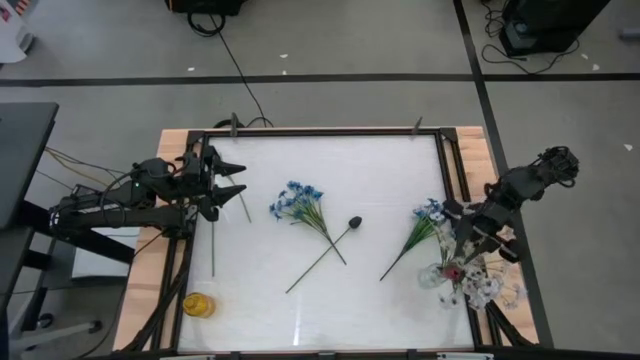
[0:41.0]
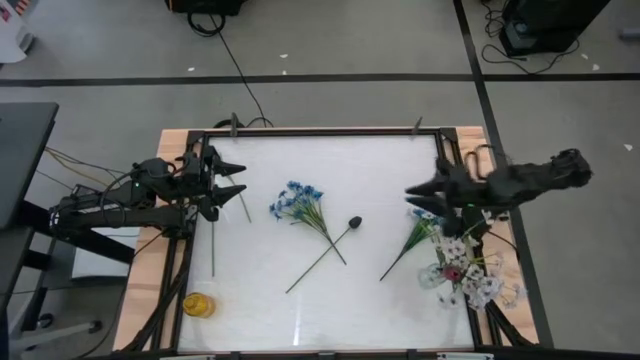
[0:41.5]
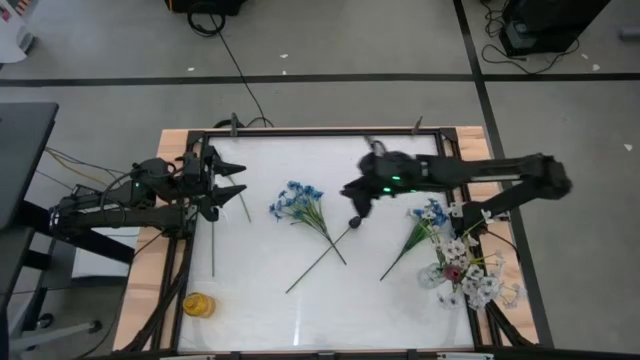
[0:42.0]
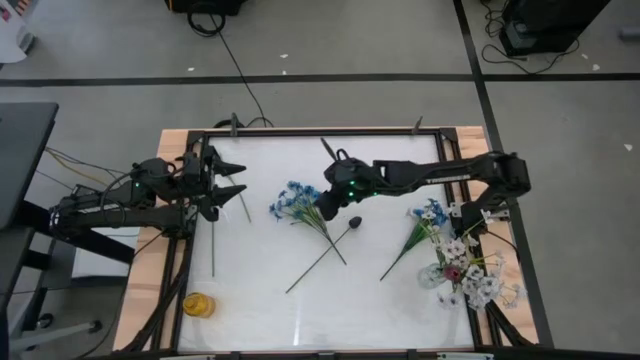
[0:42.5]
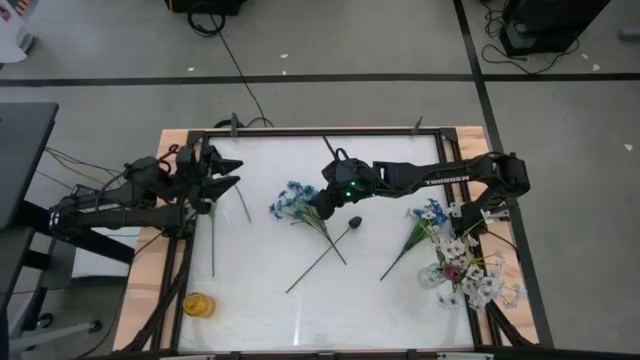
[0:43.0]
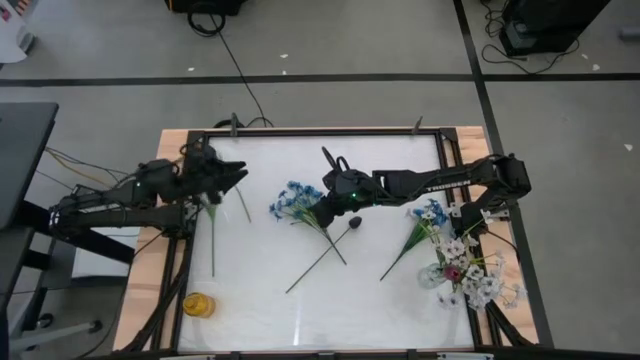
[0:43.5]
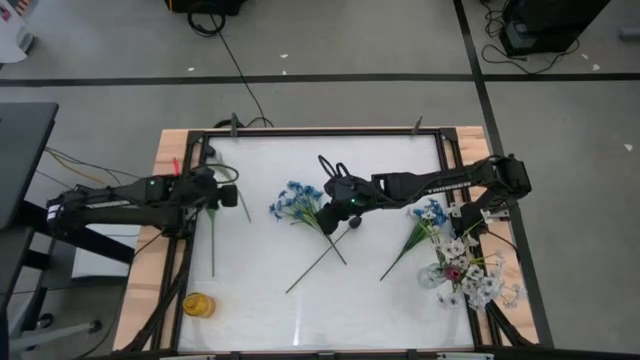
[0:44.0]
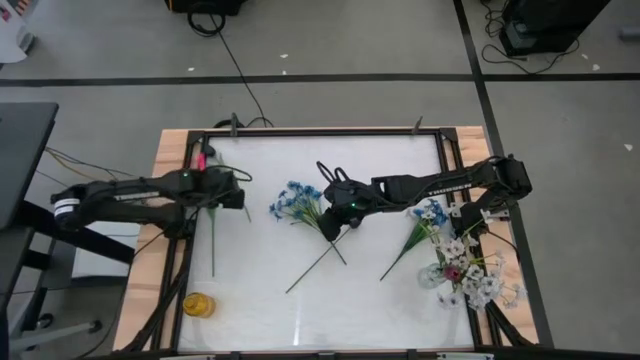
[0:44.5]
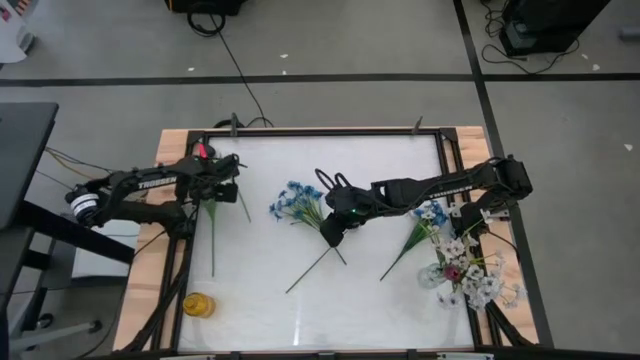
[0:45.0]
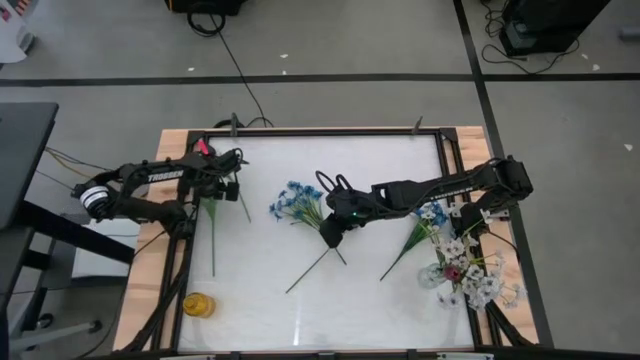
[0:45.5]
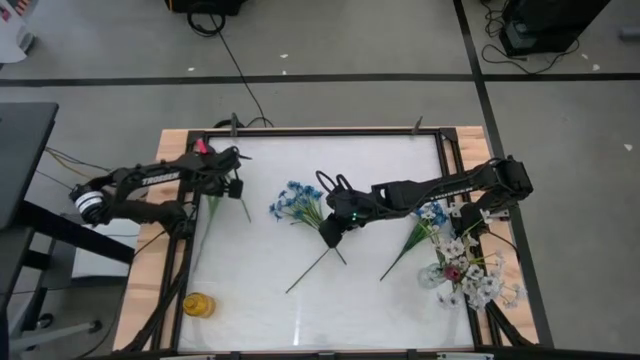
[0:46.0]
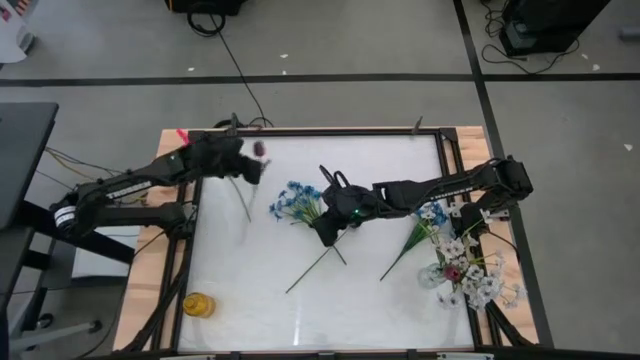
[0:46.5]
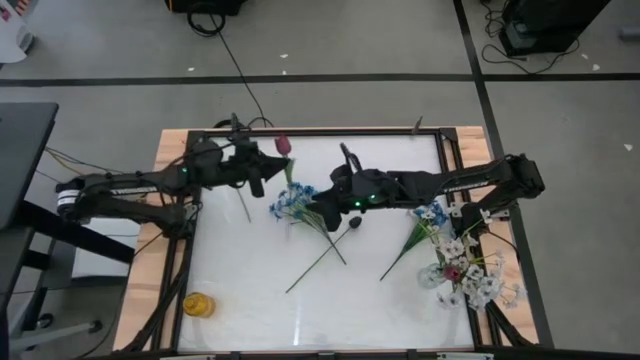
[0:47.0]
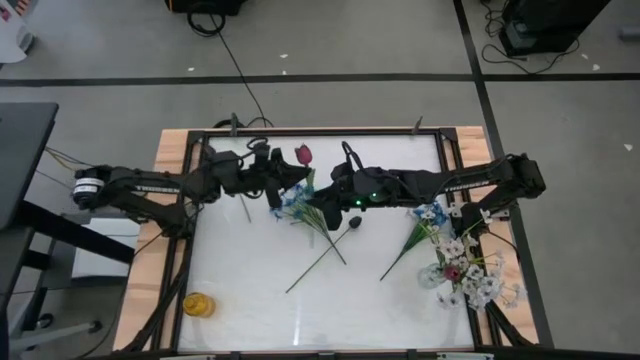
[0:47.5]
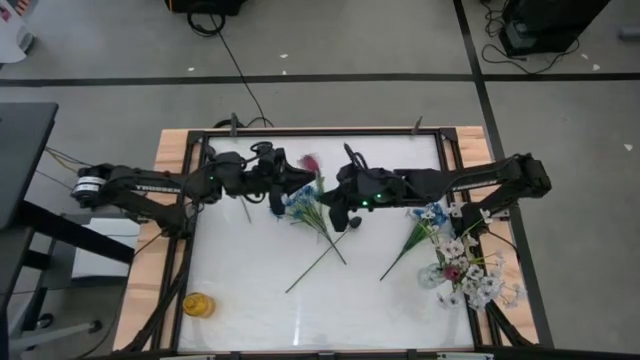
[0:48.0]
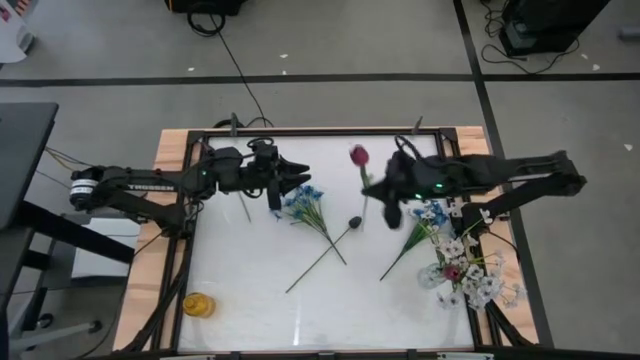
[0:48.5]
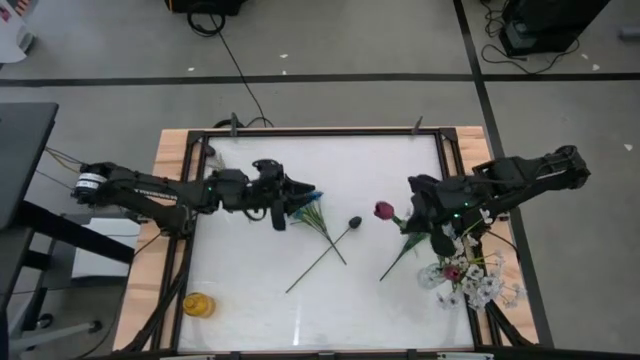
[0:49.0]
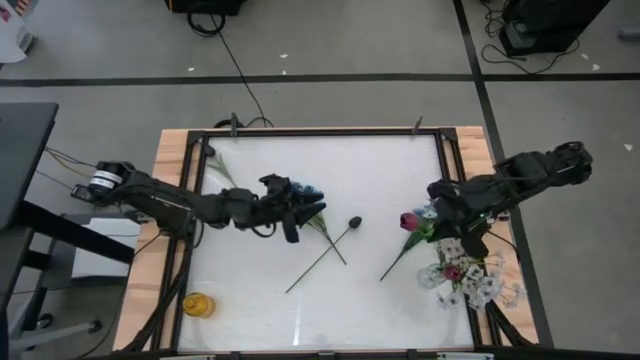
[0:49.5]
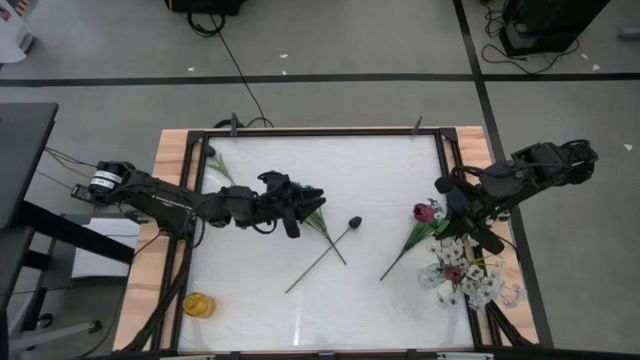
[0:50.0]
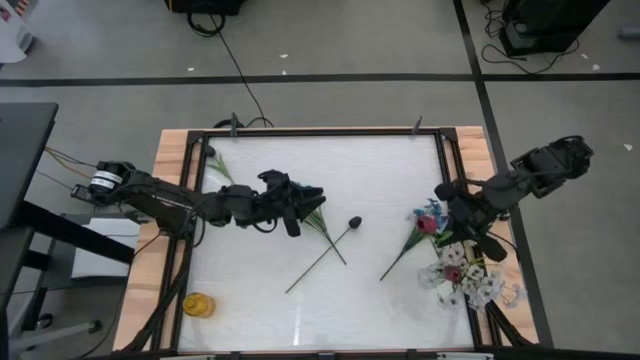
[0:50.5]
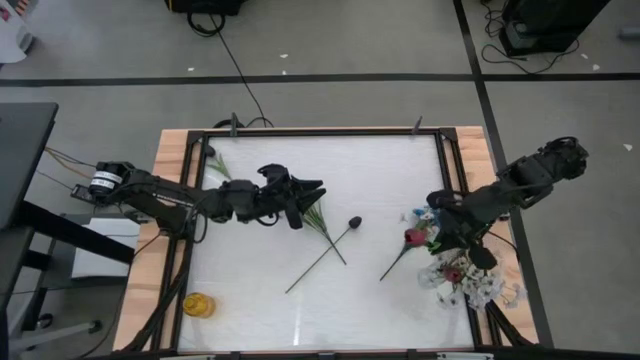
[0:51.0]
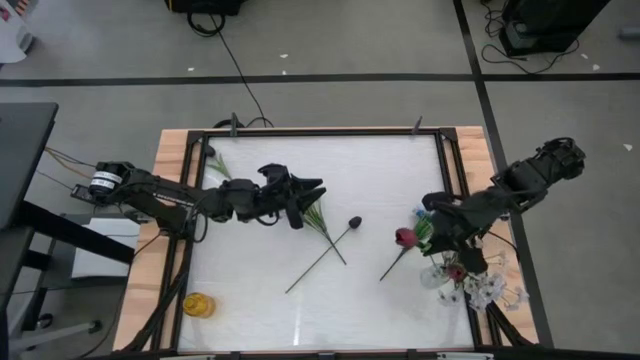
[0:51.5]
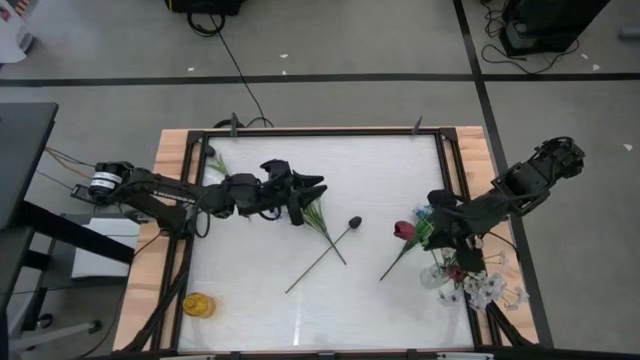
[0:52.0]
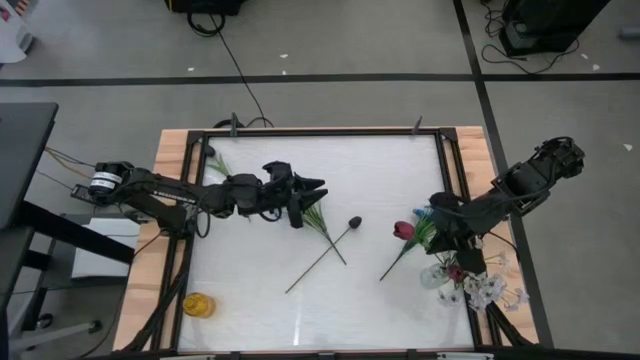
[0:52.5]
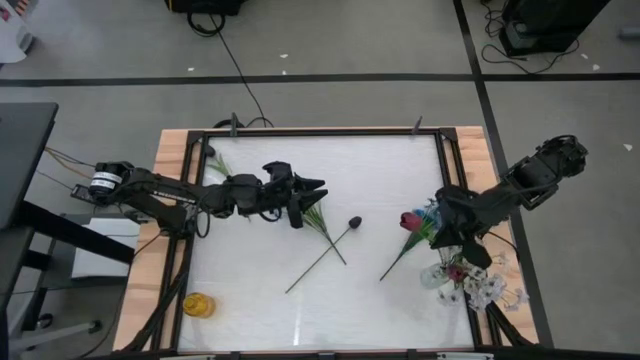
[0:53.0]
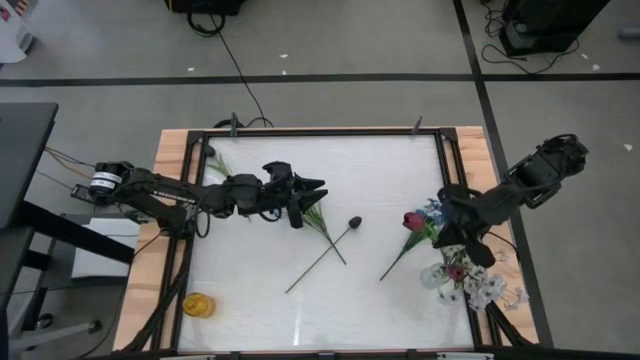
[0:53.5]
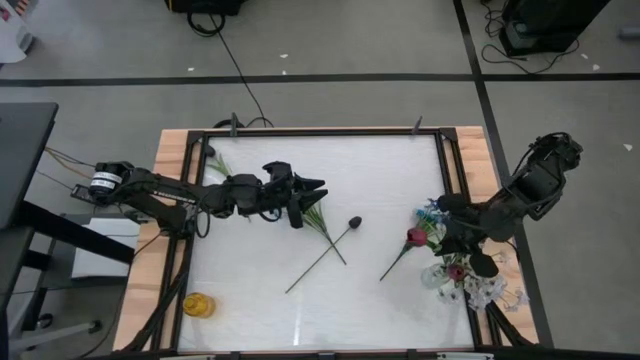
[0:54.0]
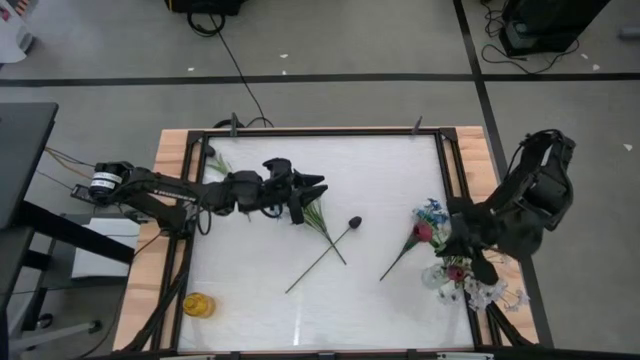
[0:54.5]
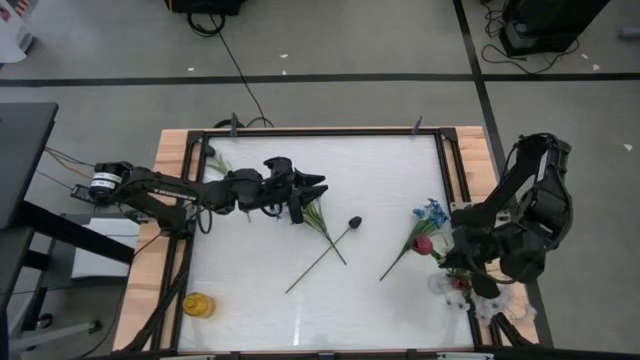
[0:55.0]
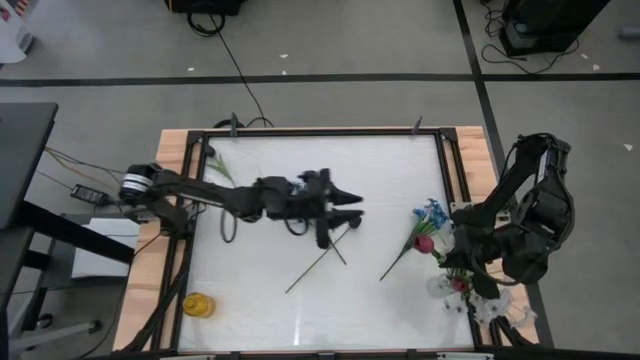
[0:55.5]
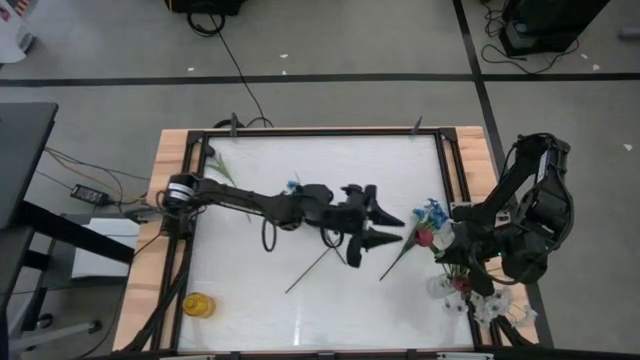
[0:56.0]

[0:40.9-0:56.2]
Task: Sort flowers into vase by color
Put the red tulip into the transparent vase

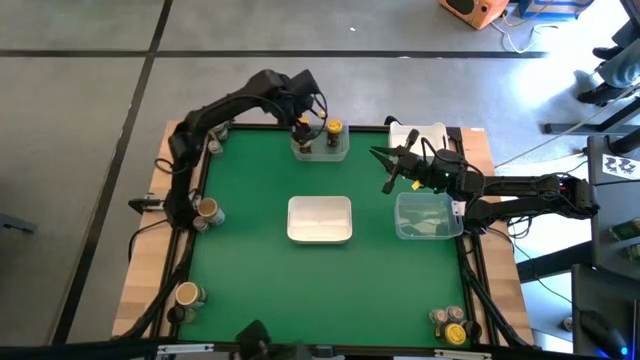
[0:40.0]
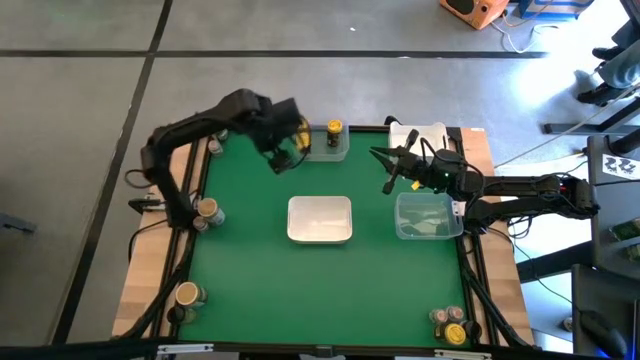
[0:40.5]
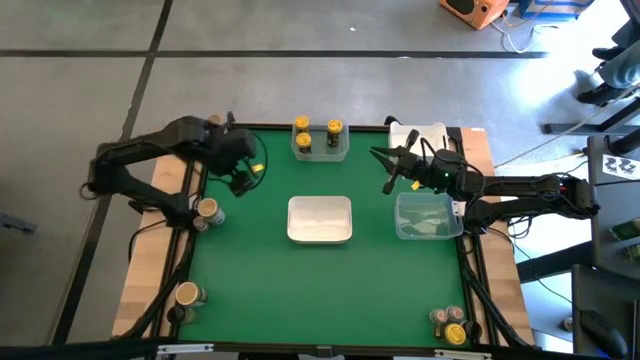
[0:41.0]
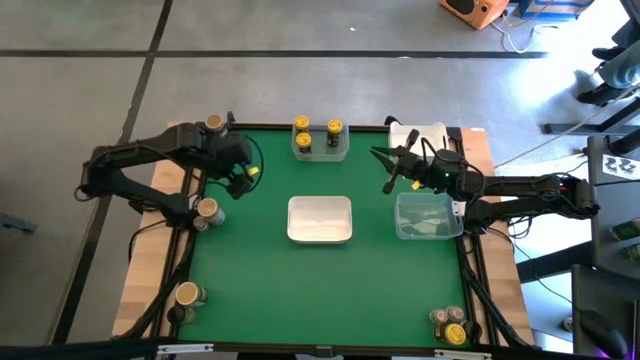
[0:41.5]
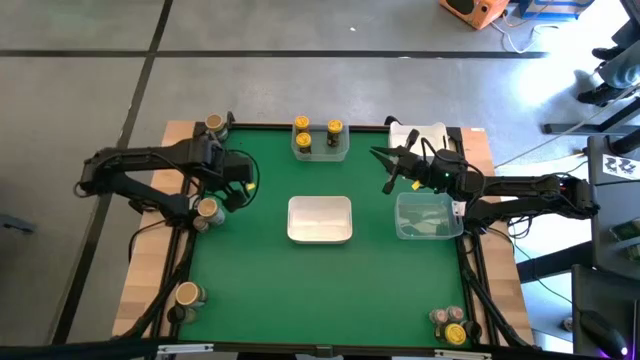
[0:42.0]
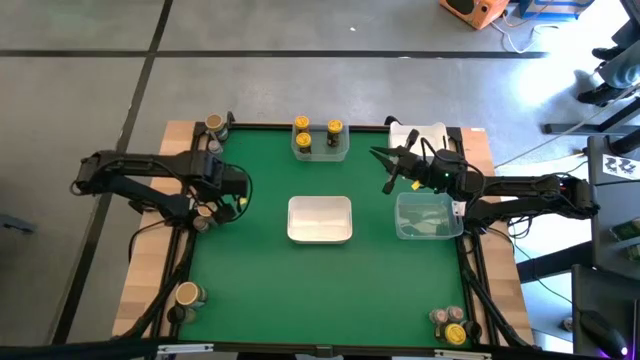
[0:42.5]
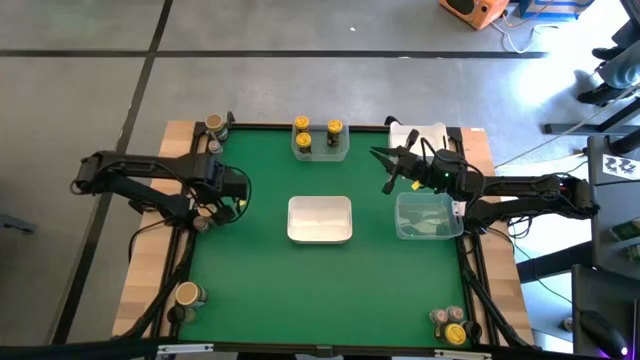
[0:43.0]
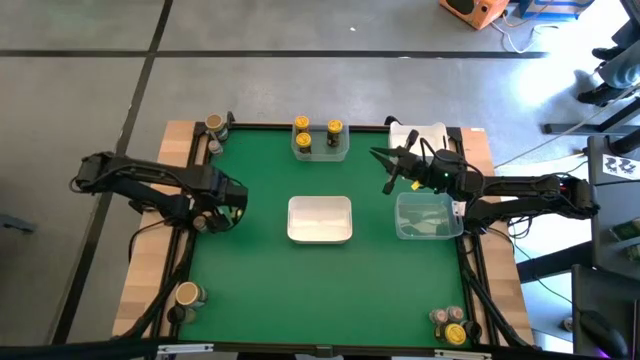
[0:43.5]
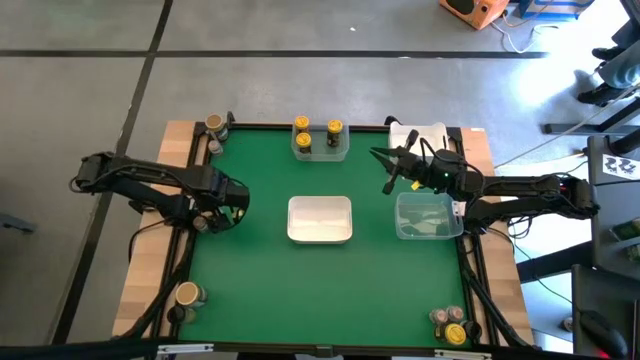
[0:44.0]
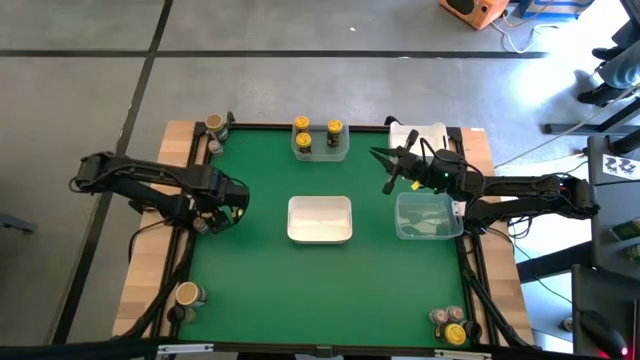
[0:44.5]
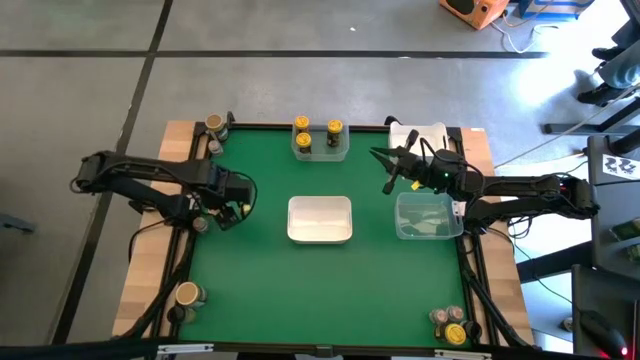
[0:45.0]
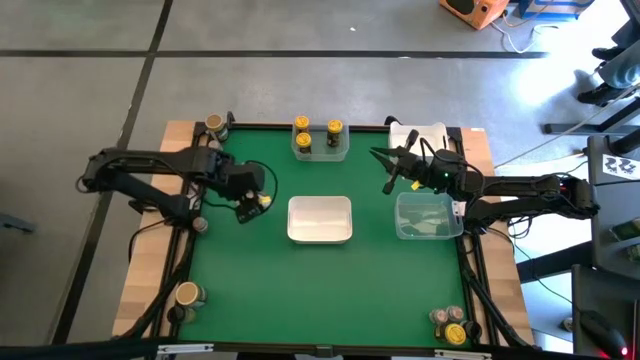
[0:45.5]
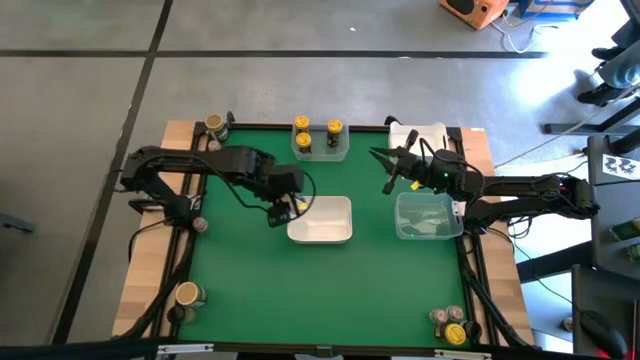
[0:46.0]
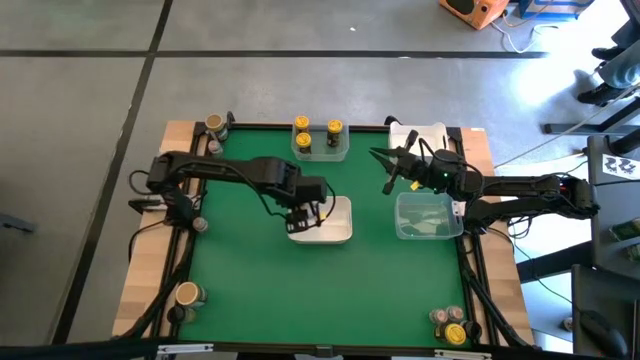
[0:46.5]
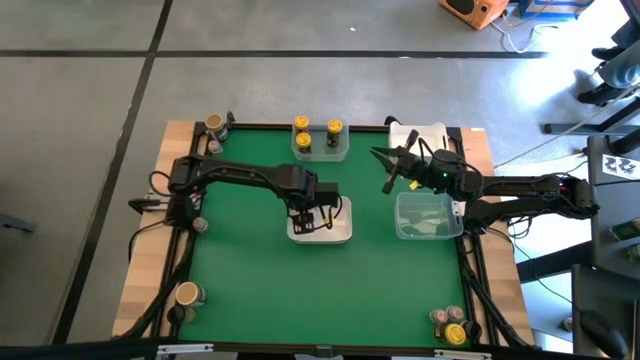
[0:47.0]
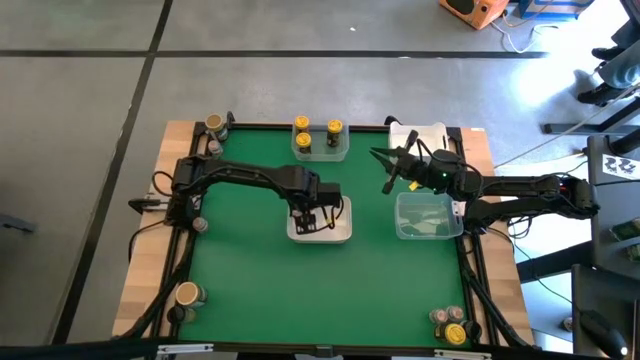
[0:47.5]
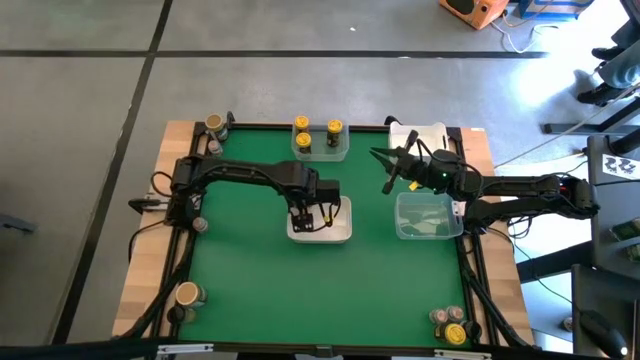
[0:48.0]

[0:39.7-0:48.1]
Task: Sort spices by type
Put the middle gold seasoning bottle into the bottom white bin
